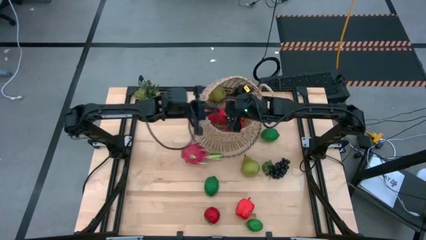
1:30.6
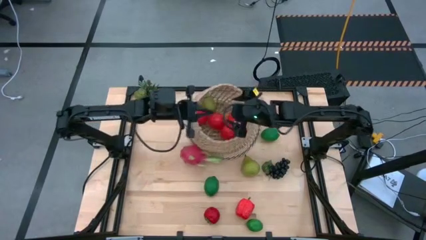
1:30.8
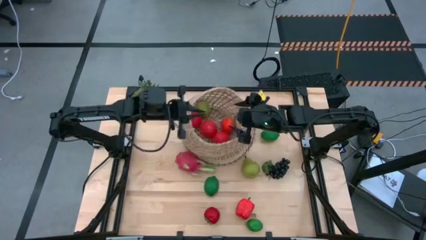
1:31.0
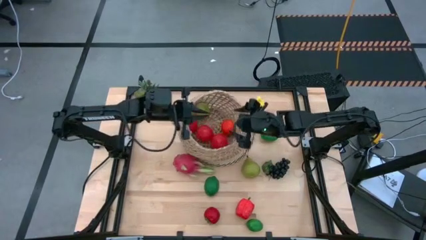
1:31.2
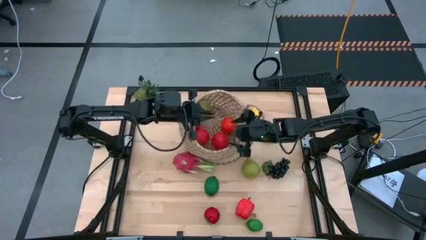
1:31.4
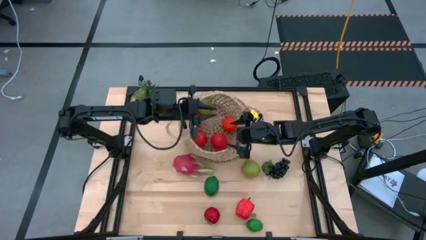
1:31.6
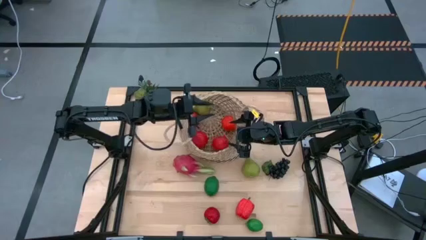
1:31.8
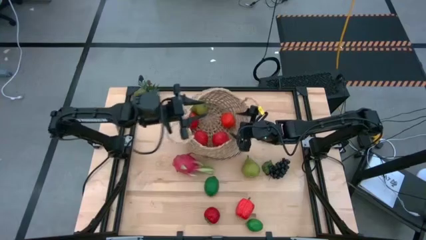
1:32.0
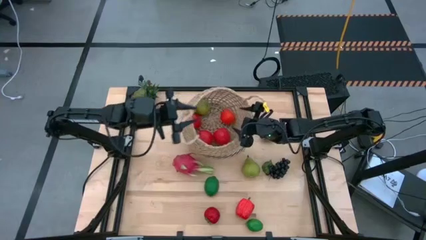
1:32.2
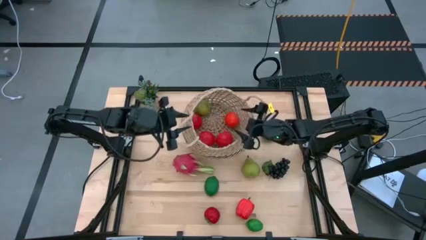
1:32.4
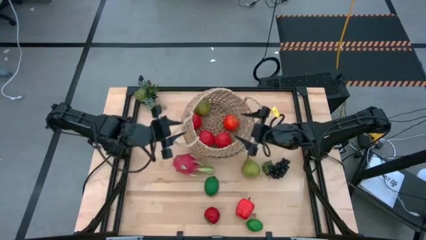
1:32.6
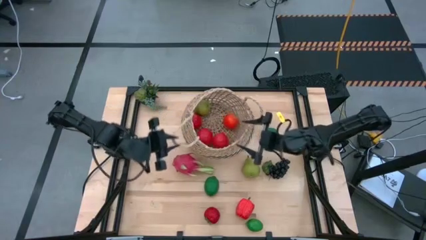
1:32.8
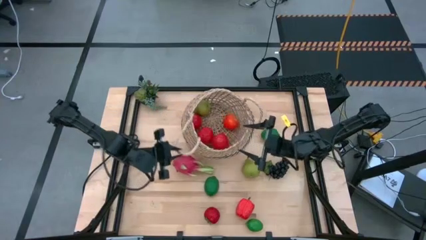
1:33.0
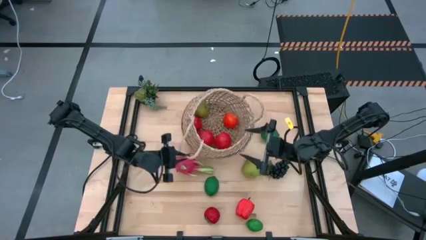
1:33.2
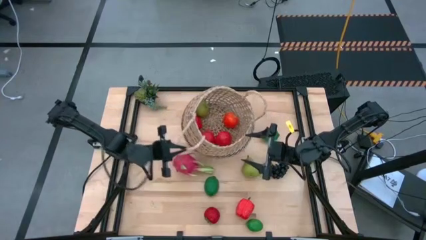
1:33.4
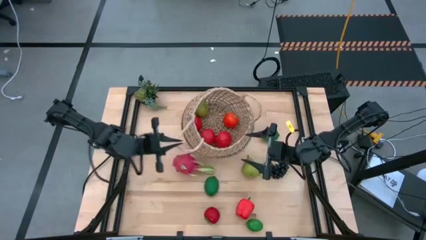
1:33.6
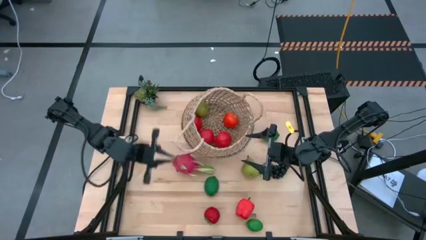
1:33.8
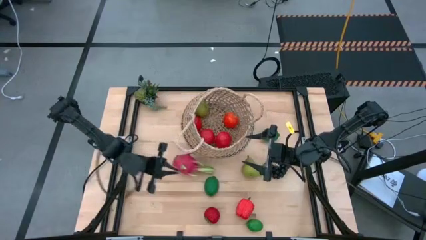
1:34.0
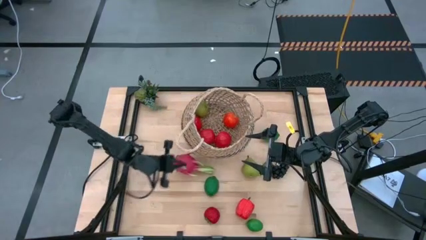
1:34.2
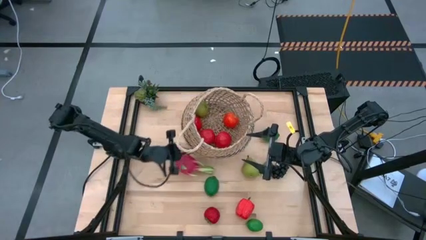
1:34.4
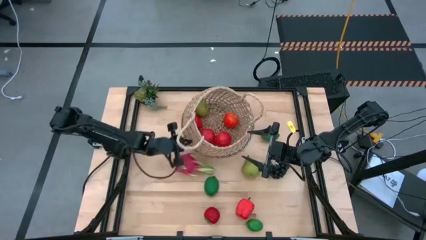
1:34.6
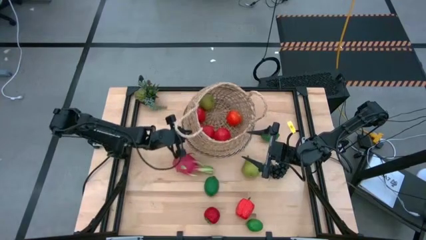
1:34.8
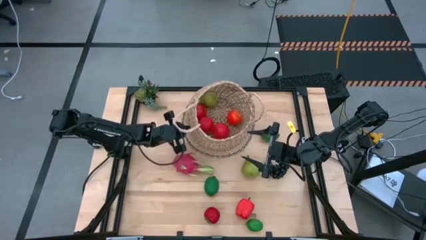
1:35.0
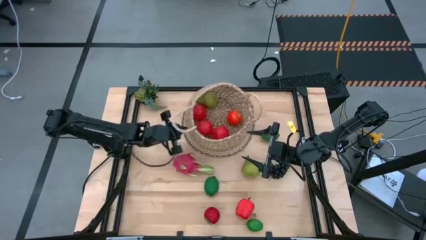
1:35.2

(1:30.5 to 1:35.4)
Task: Build produce basket
Adjust the basket on the mat

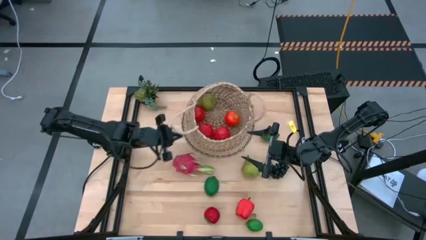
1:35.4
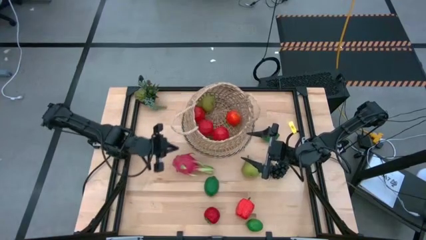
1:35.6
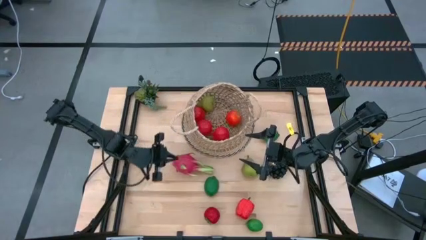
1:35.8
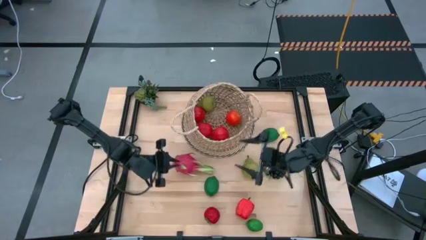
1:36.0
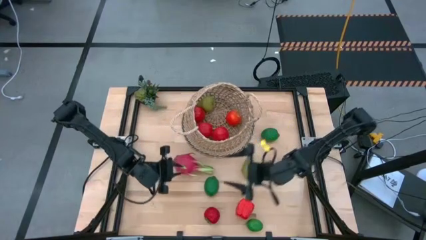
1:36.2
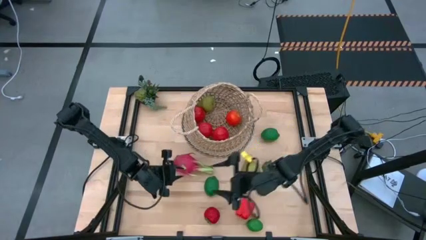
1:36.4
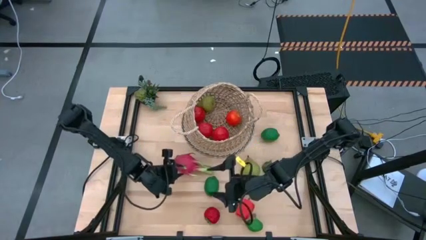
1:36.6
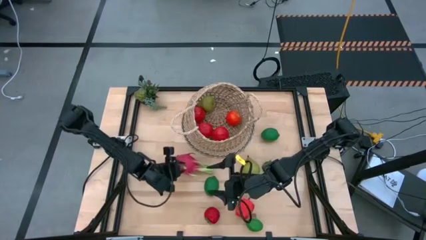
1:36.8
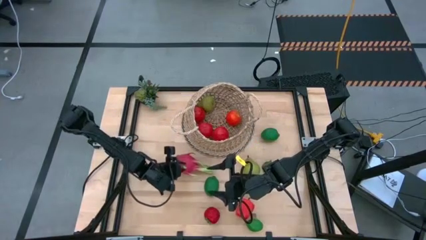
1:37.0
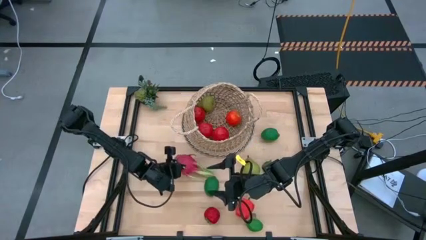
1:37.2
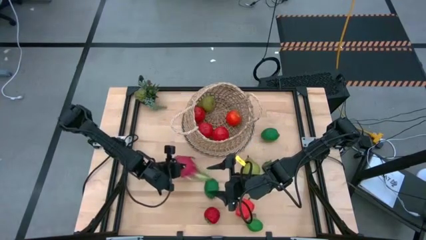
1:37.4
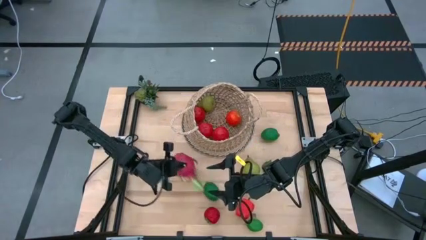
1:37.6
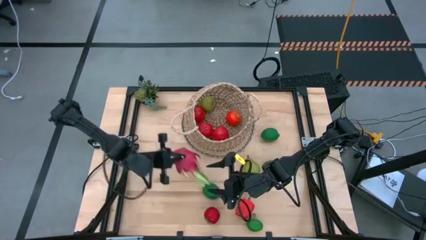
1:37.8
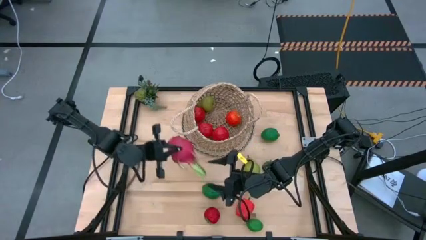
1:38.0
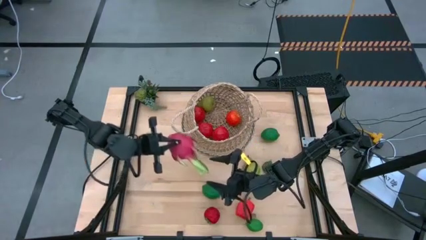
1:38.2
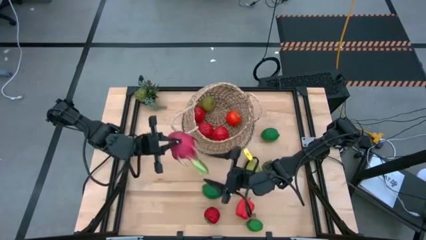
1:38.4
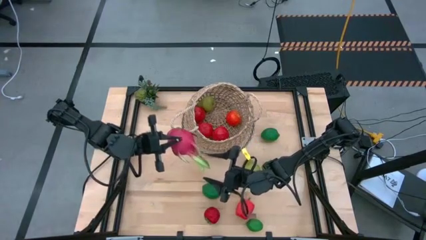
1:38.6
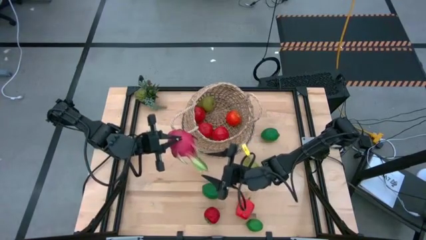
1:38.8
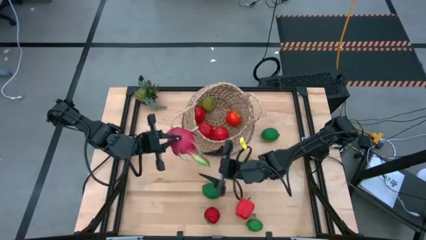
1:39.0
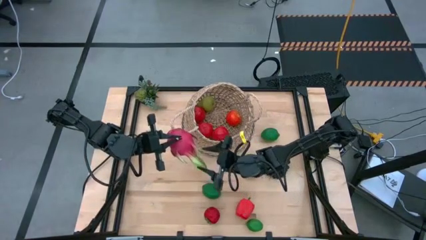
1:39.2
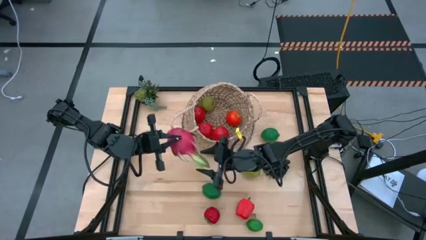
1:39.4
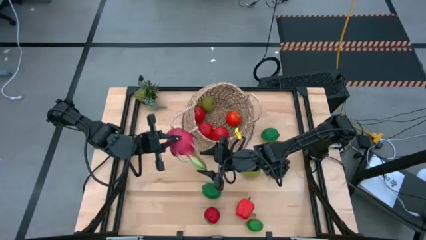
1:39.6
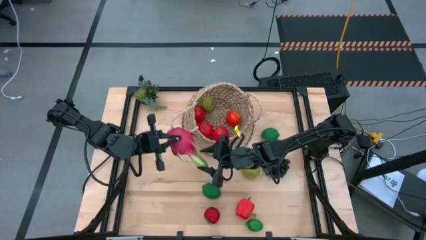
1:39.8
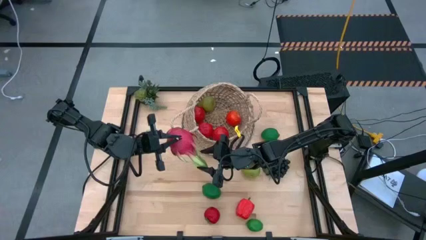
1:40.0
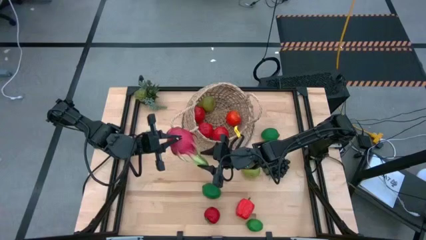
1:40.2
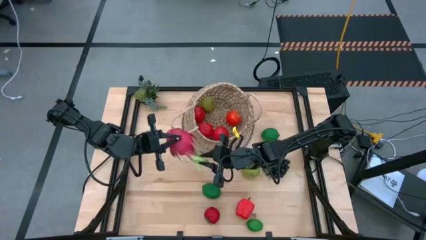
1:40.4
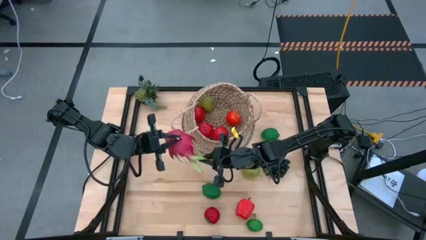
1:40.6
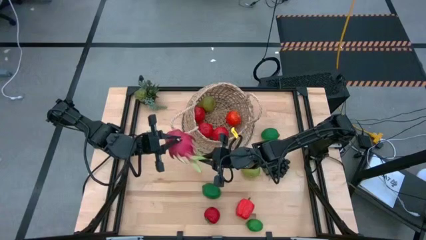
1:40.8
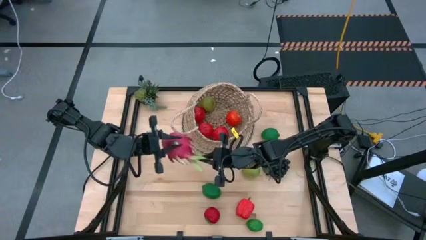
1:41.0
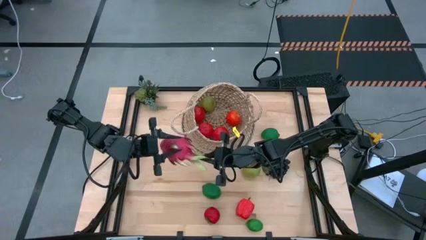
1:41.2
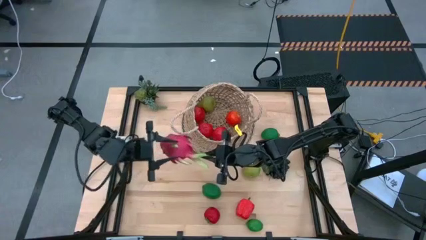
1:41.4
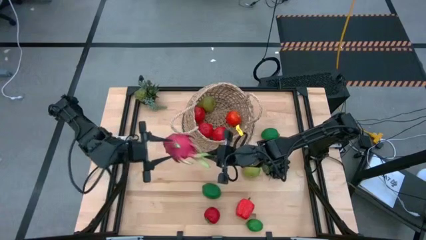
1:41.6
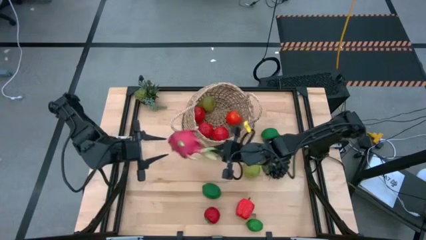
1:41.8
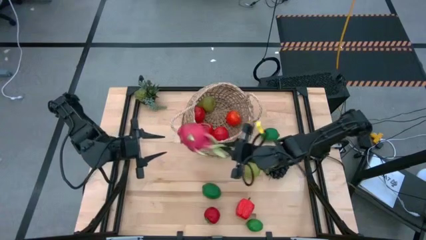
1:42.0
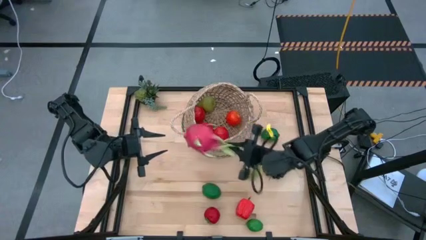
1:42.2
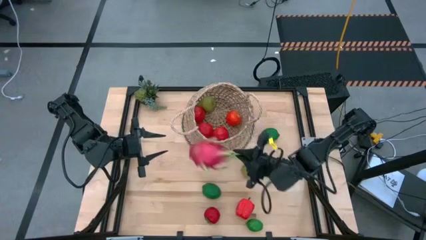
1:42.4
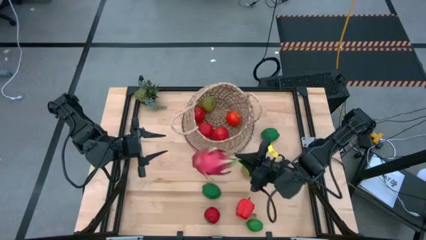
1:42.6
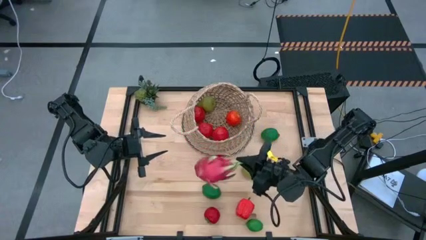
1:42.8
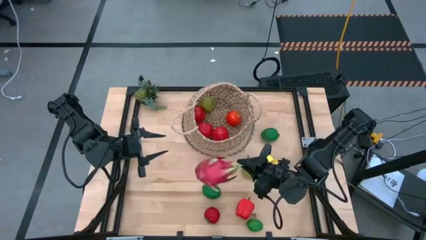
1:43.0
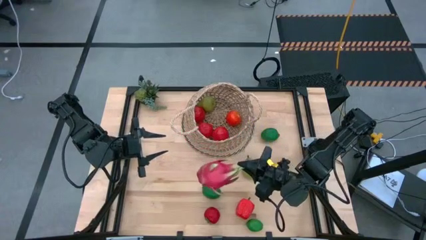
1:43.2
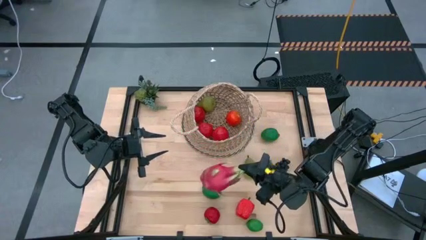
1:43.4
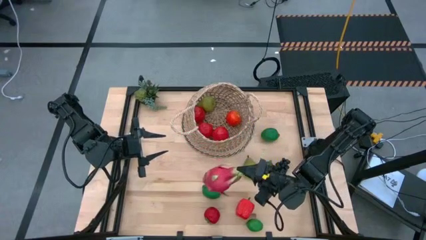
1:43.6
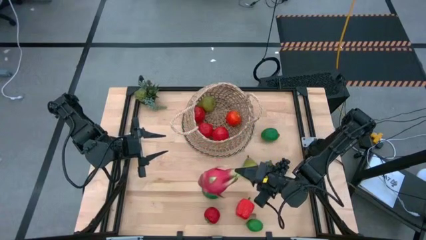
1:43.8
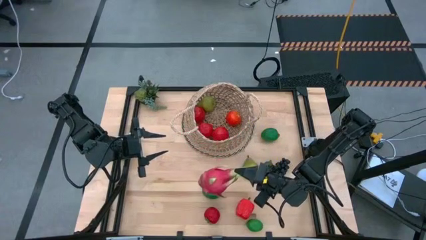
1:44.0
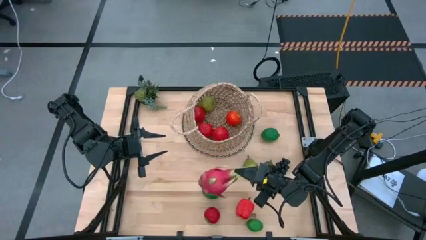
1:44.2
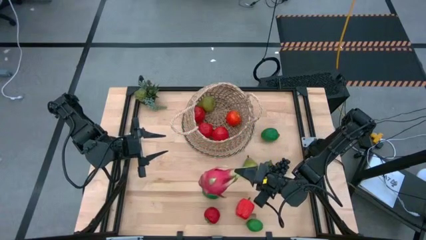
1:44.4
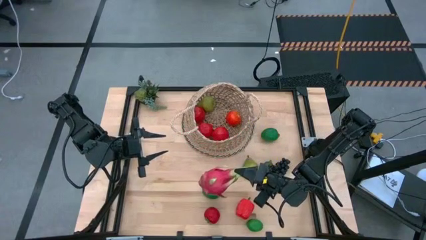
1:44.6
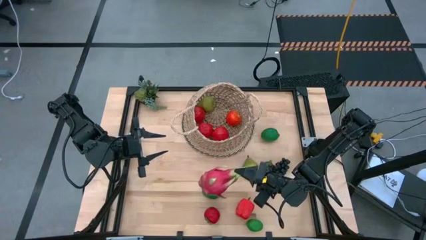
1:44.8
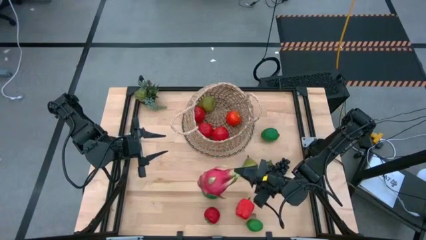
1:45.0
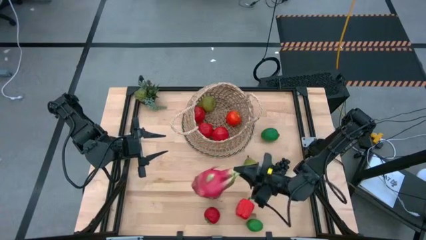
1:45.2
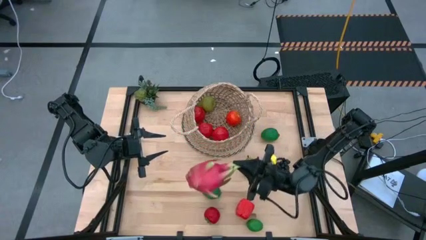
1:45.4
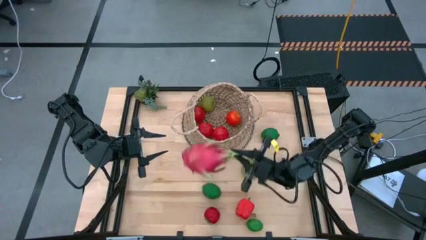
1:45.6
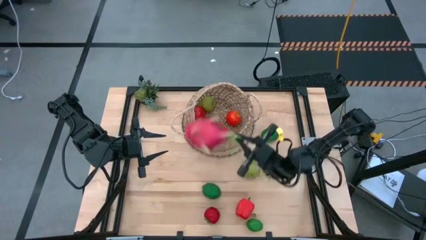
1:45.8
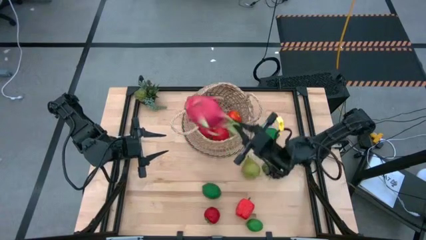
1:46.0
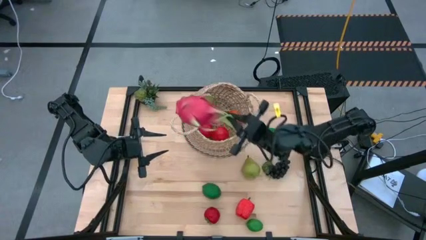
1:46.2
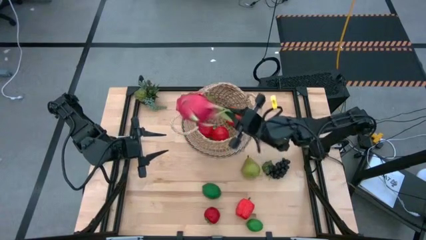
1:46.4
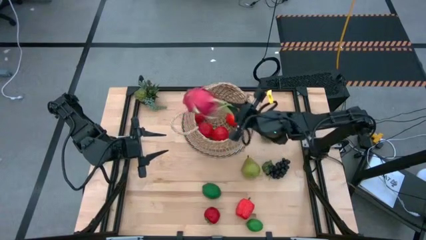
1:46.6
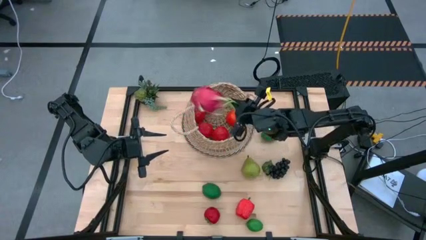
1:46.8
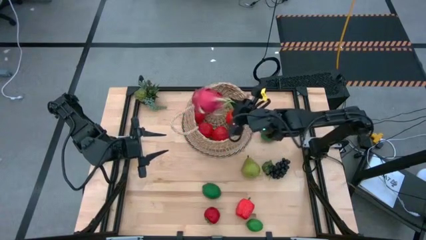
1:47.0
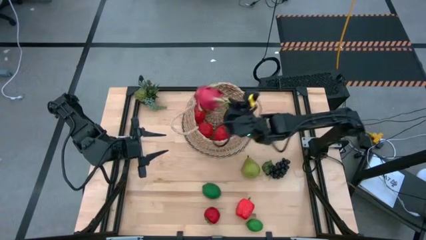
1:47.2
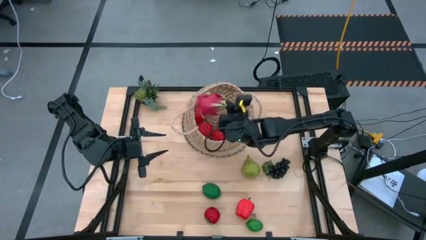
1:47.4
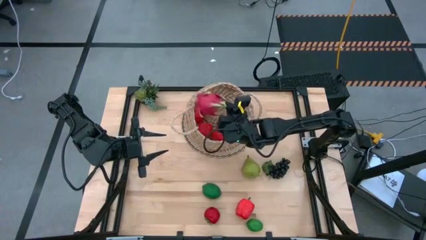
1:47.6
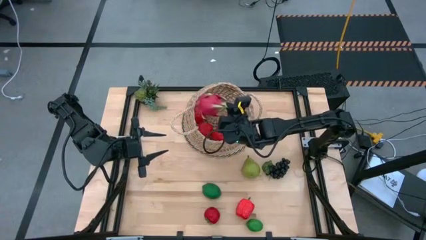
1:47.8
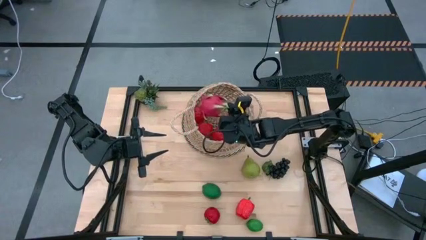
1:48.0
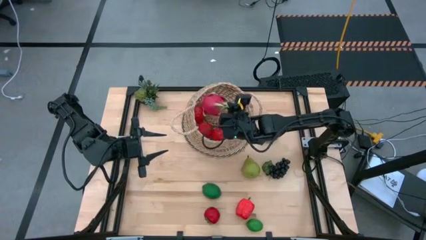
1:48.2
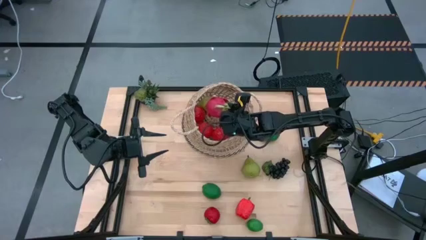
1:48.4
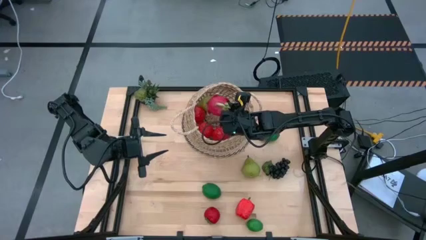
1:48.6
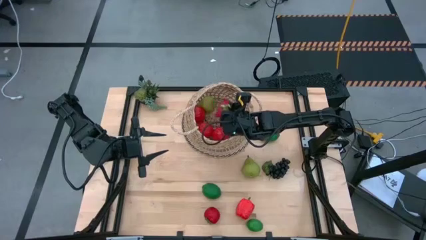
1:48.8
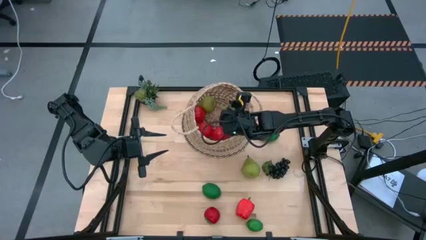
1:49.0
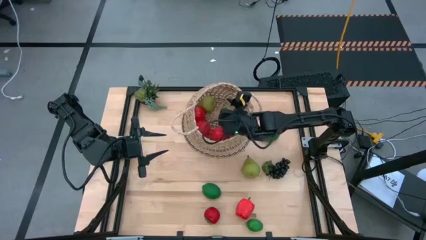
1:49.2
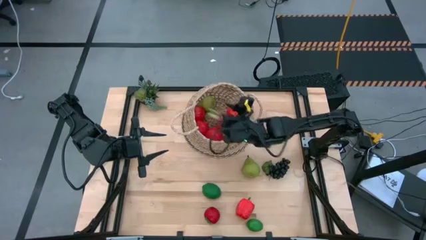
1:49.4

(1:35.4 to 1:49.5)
Put the dragon fruit into the basket
